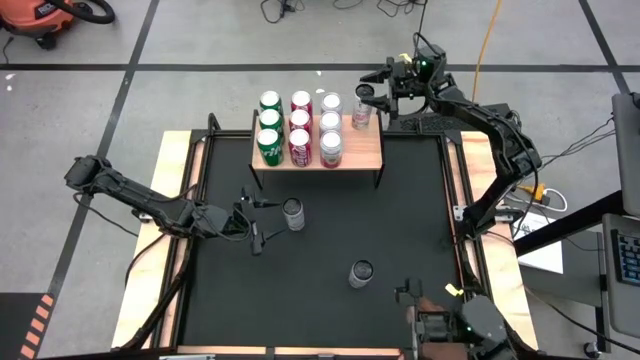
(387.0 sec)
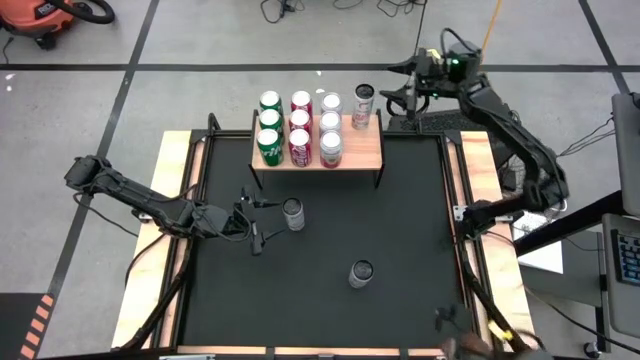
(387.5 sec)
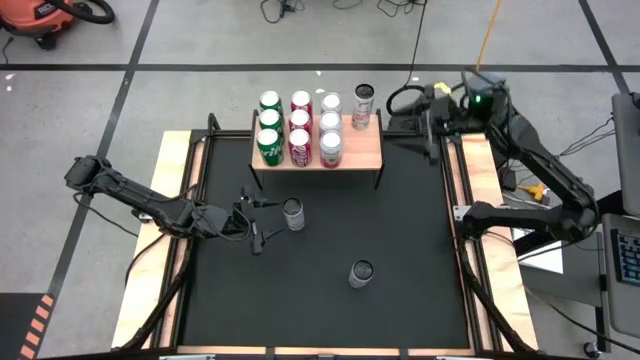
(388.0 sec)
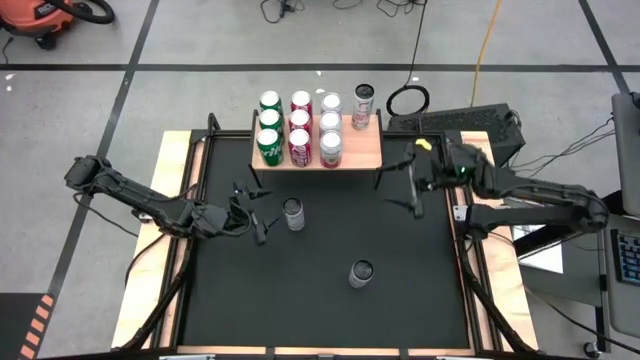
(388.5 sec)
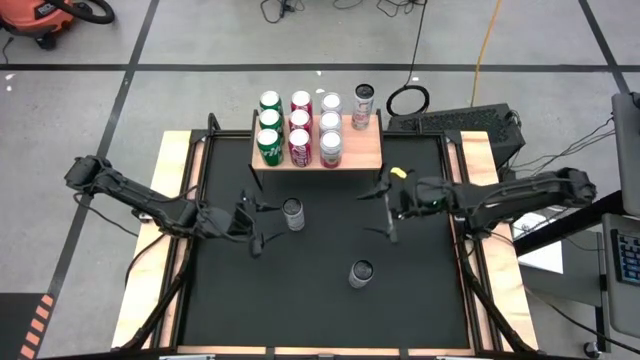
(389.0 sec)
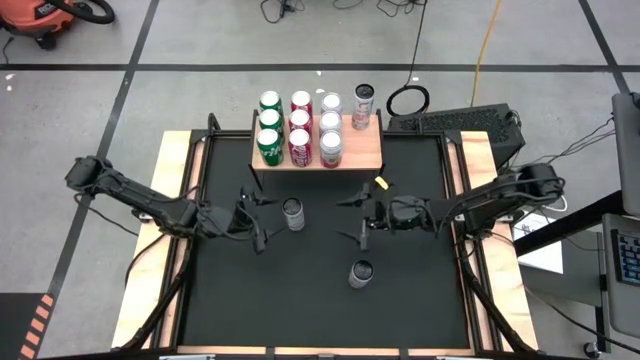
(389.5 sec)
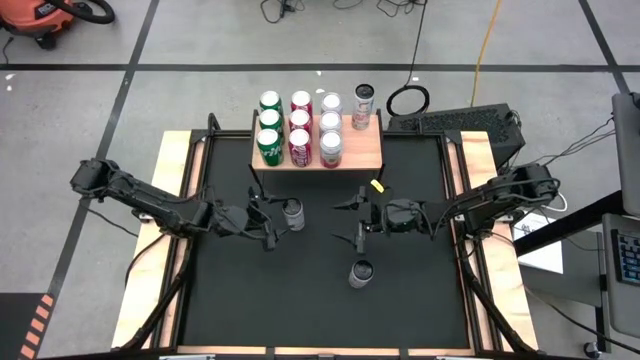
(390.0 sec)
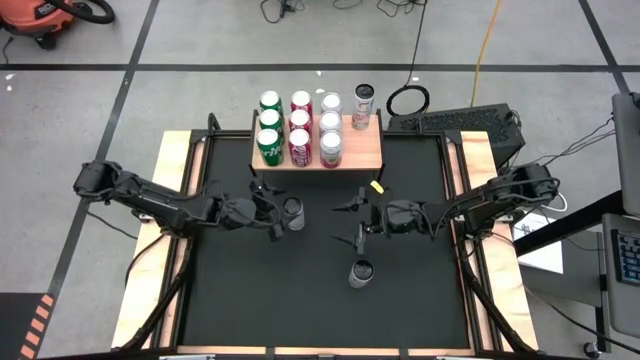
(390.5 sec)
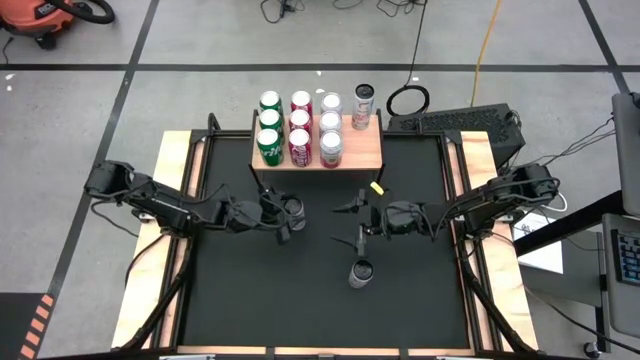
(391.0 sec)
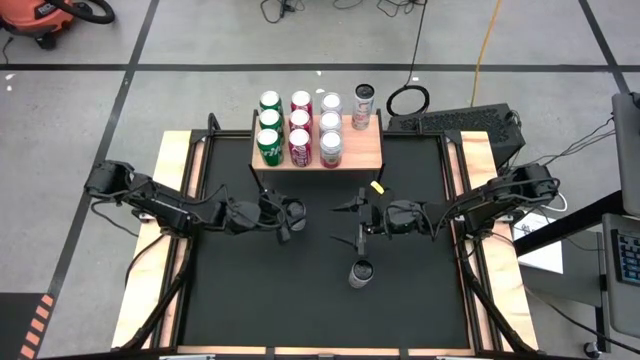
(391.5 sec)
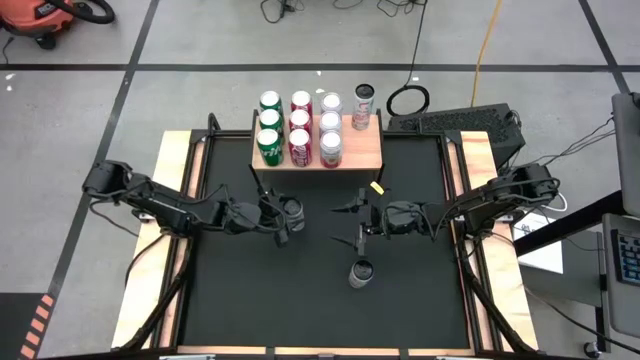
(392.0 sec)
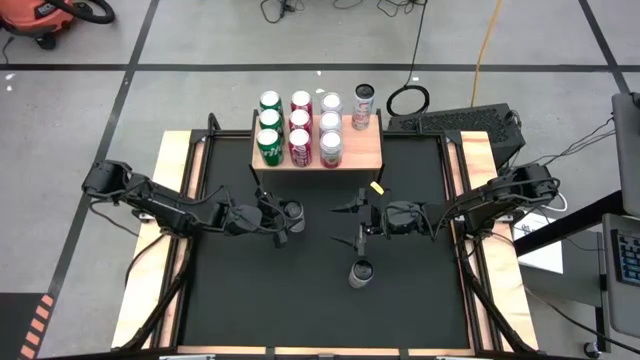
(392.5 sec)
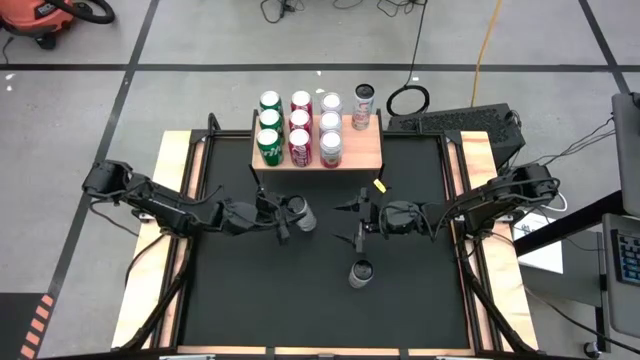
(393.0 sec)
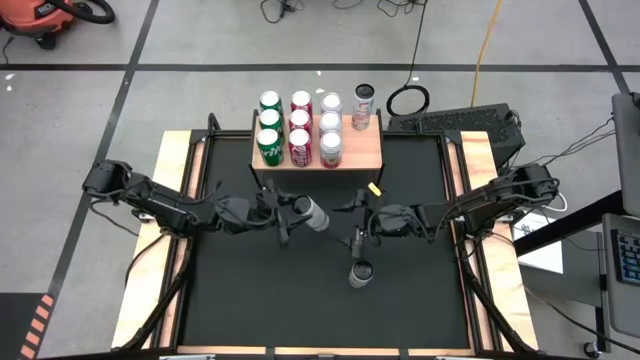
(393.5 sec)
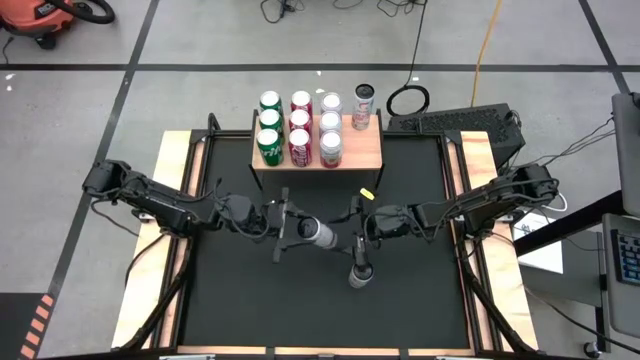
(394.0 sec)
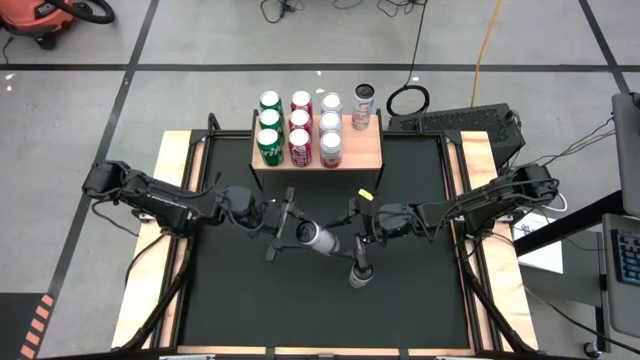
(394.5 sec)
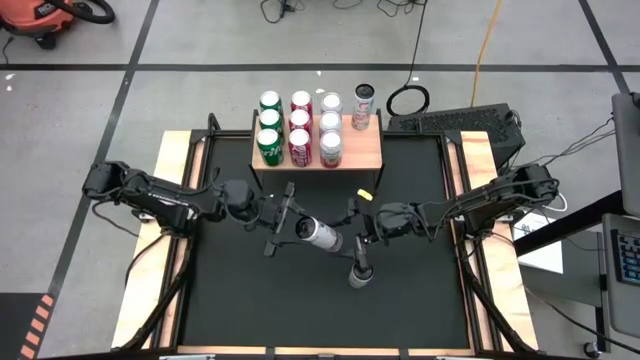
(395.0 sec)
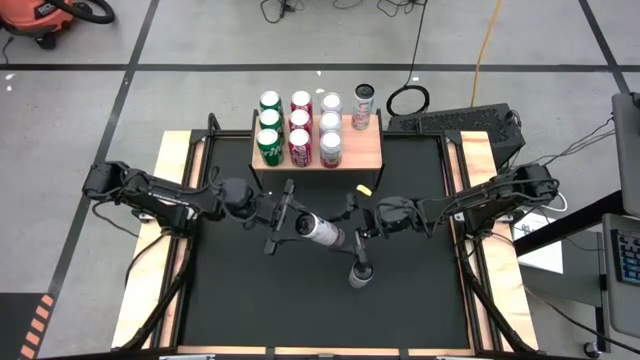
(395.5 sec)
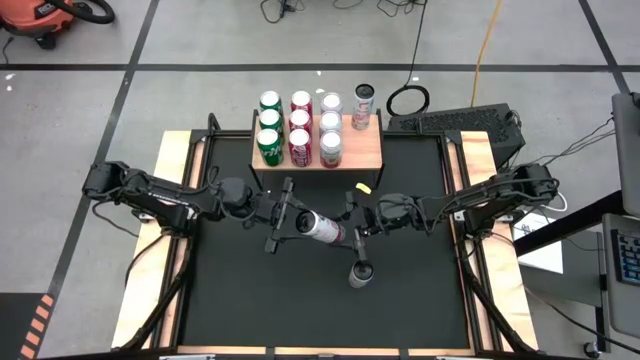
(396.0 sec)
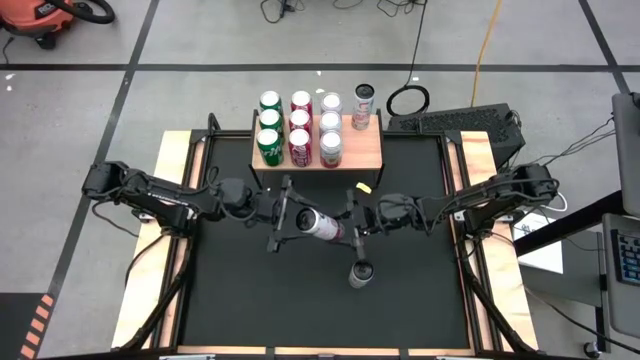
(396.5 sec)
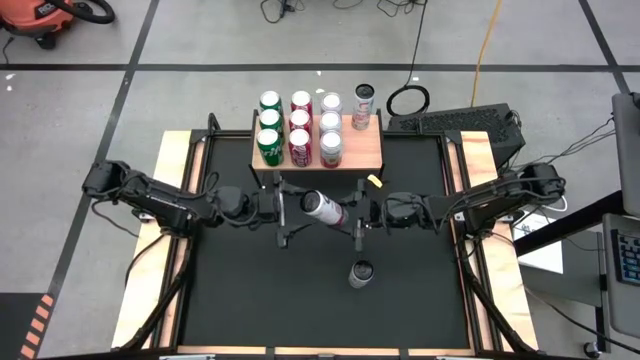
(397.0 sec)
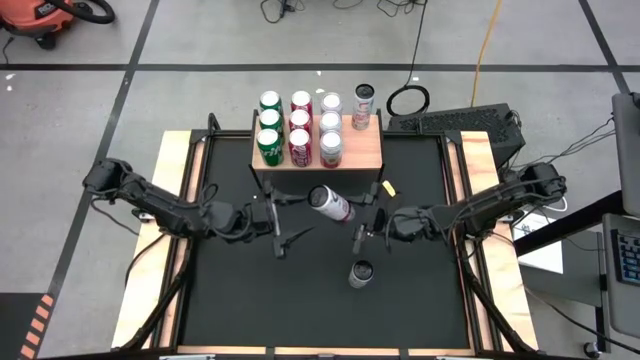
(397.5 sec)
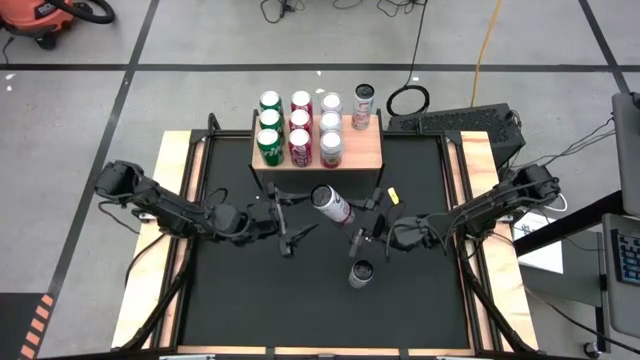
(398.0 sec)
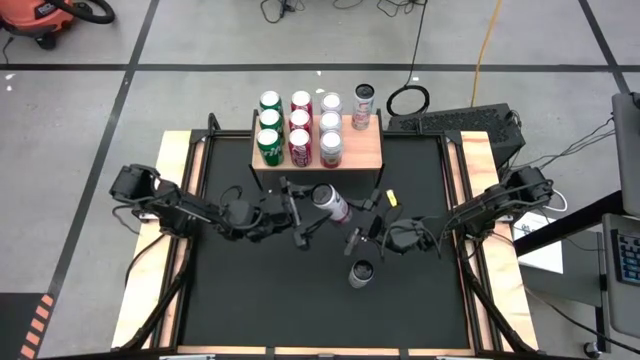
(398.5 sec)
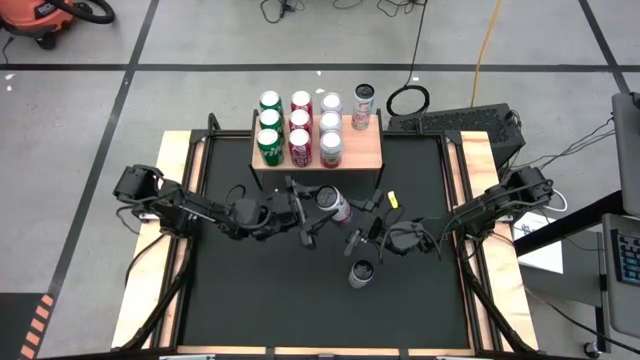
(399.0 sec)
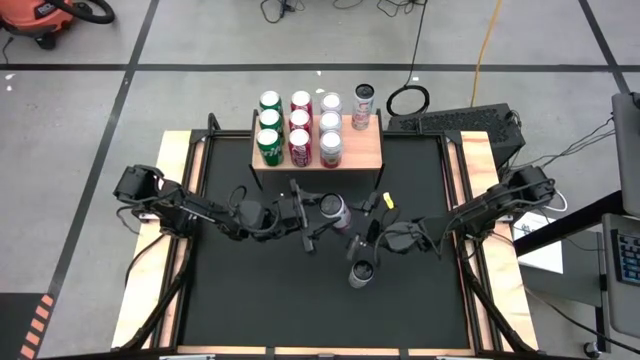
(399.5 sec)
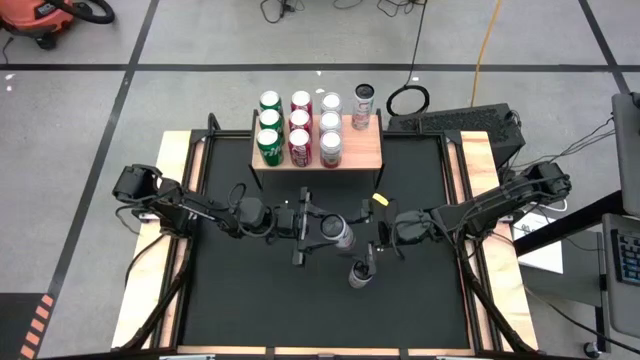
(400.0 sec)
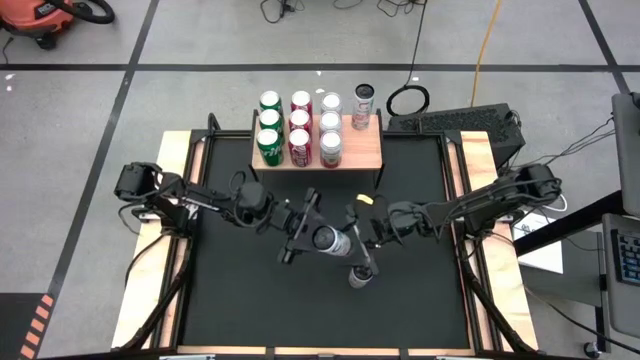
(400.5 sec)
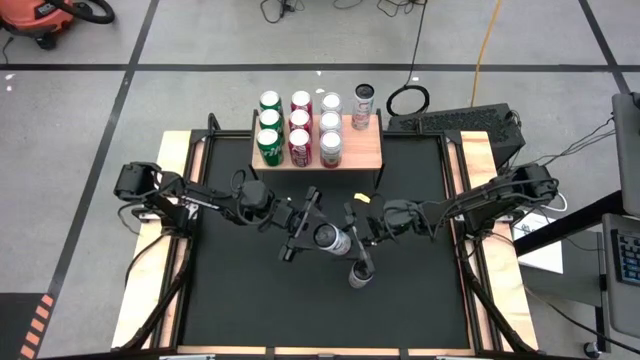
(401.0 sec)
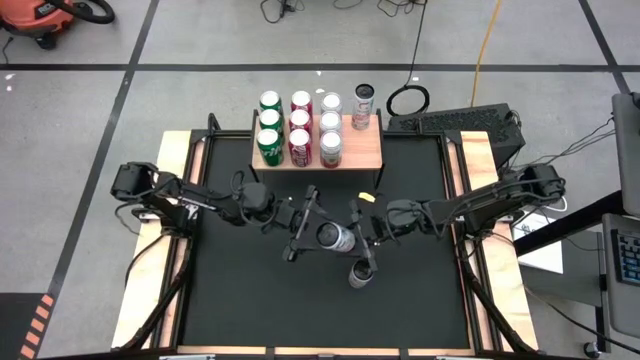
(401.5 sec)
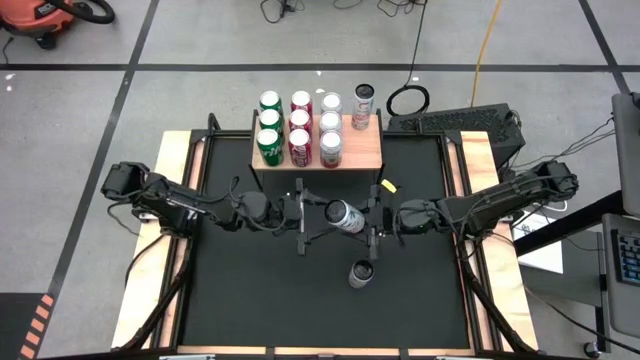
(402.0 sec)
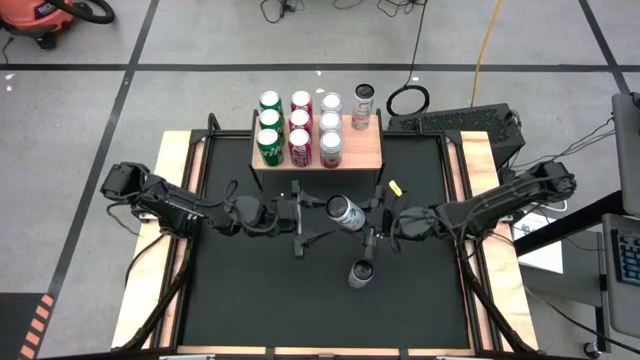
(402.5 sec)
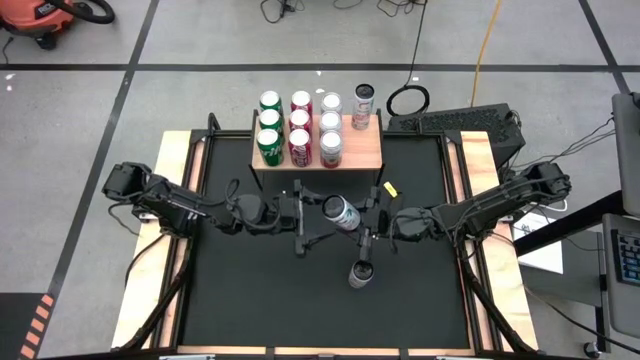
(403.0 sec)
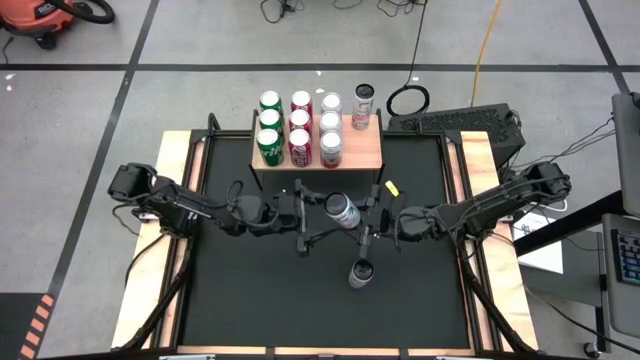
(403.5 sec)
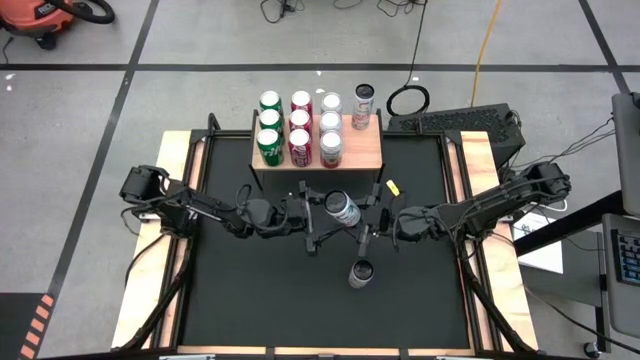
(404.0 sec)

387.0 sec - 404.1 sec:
Task: Place canned beverage on shelf
Put the top white soda can on the shelf aligned with the other white soda can

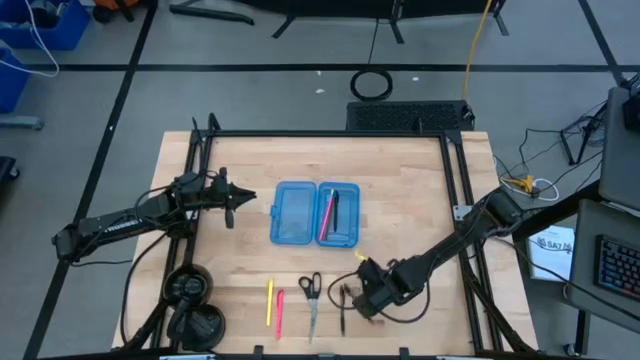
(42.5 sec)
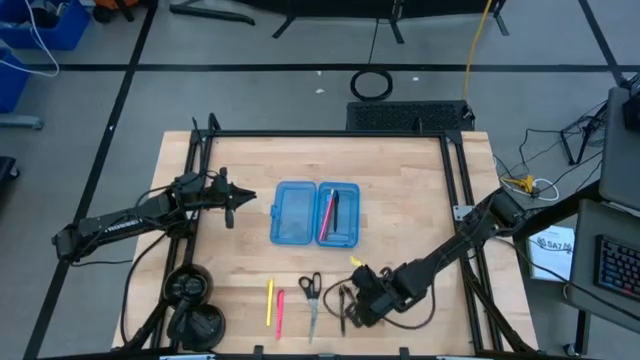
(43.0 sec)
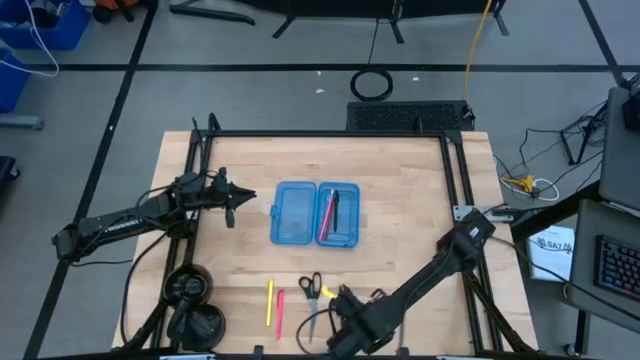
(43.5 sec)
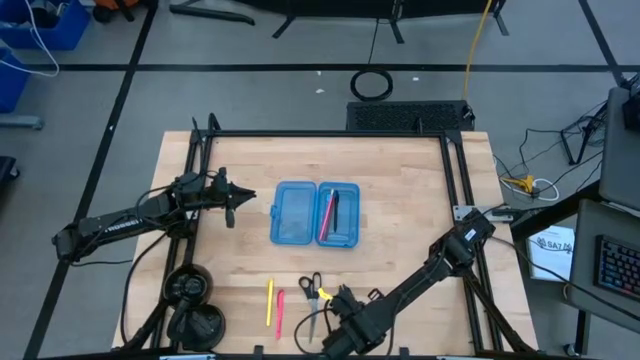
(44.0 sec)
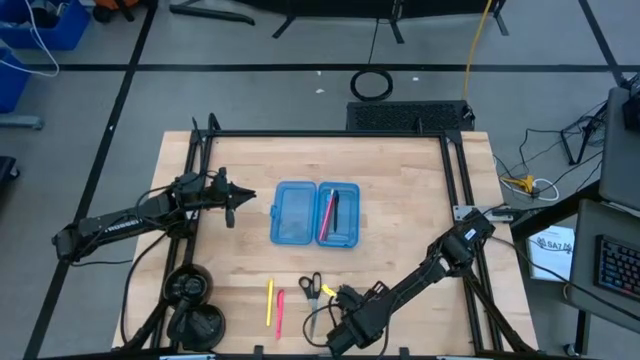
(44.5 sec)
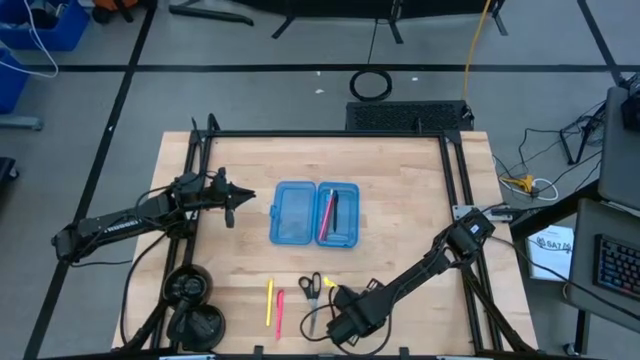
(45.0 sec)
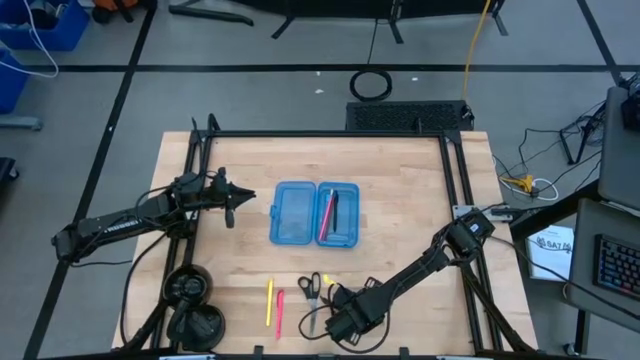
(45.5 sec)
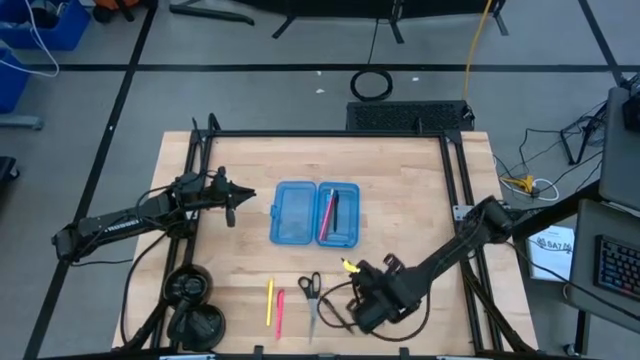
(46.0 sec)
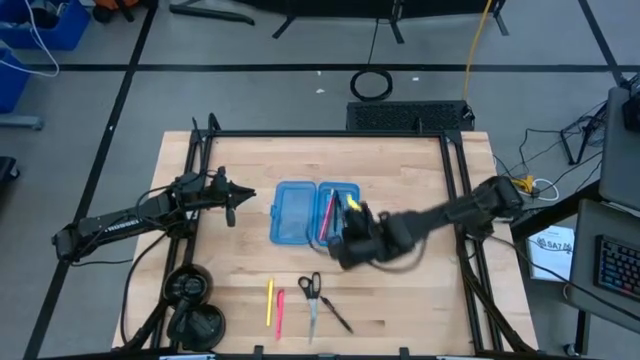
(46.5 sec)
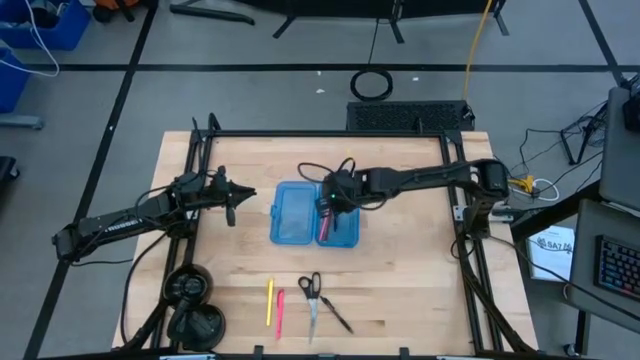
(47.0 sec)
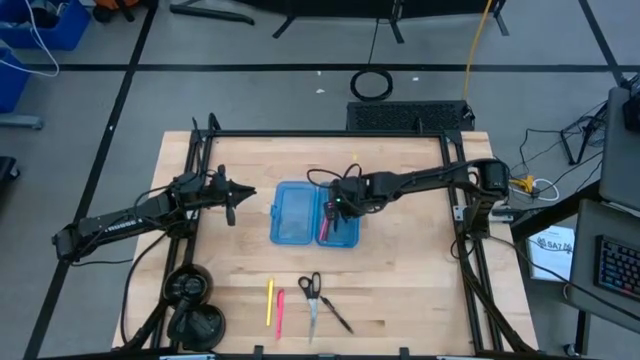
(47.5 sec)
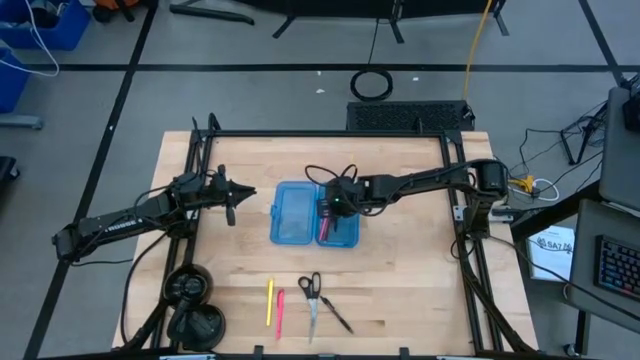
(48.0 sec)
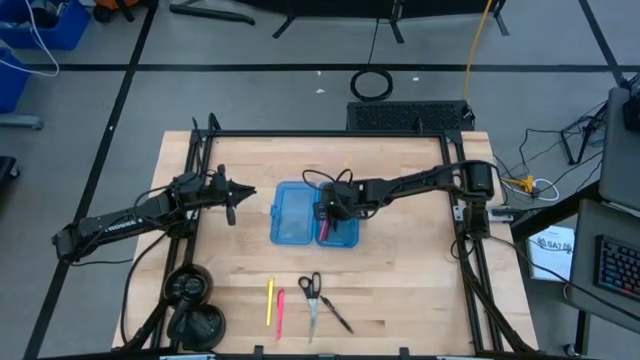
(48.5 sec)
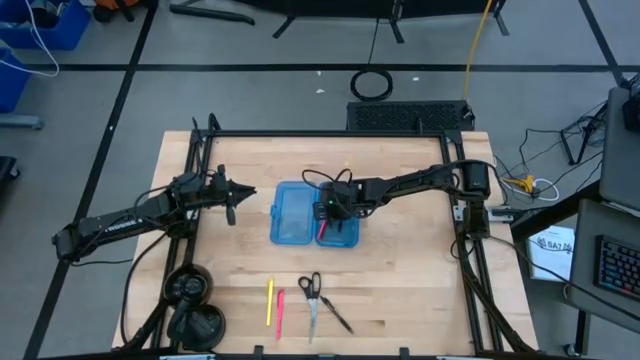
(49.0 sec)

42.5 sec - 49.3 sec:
Task: Pick & place school supplies into a supply box
Put the right black pen into the blue supply box
